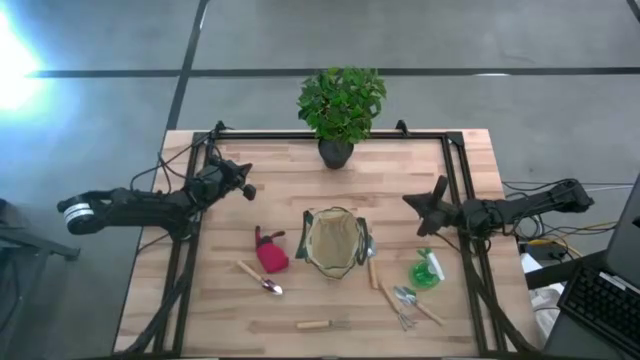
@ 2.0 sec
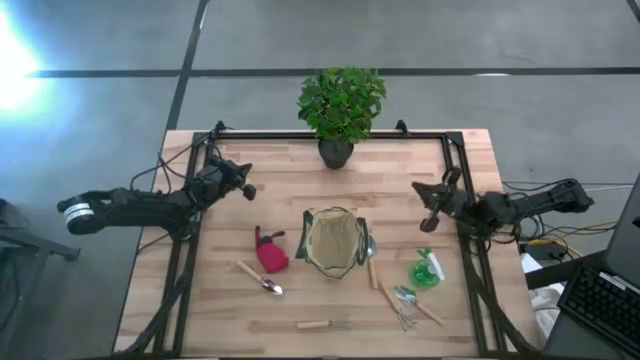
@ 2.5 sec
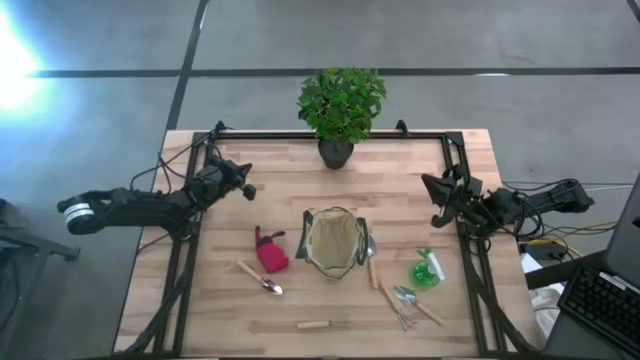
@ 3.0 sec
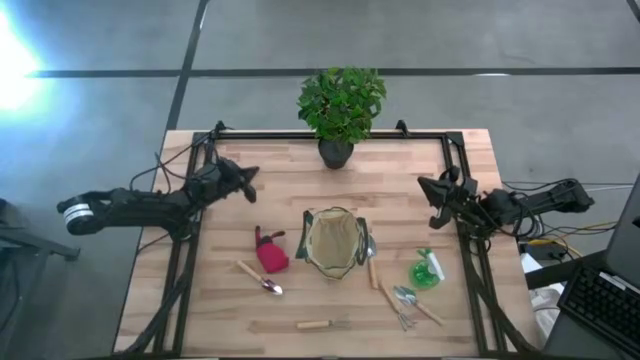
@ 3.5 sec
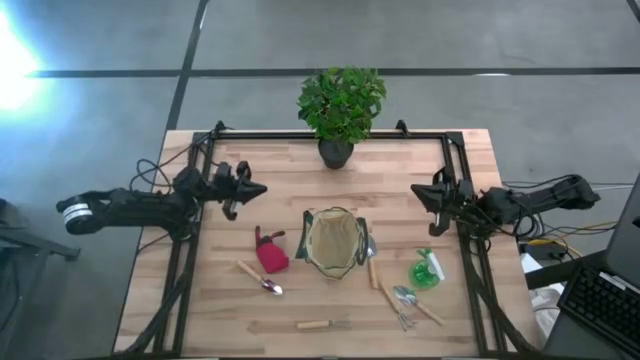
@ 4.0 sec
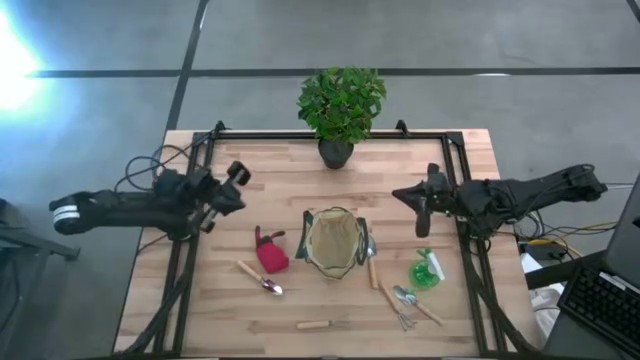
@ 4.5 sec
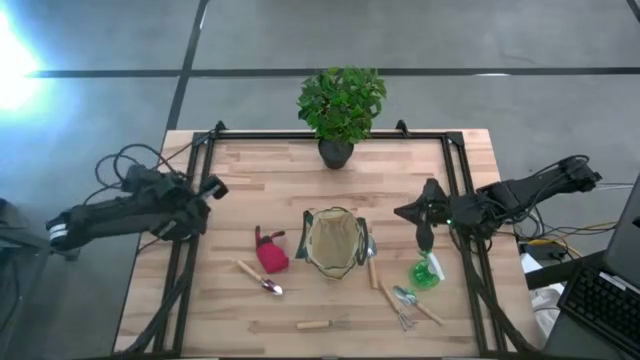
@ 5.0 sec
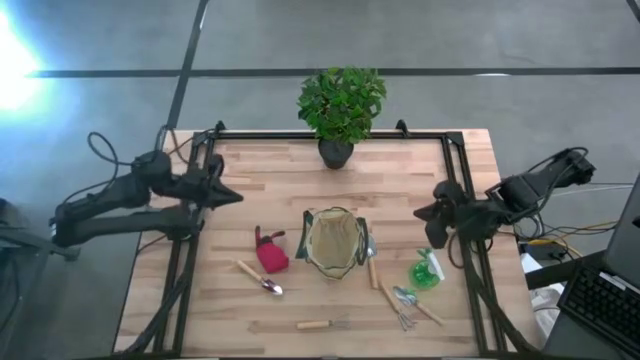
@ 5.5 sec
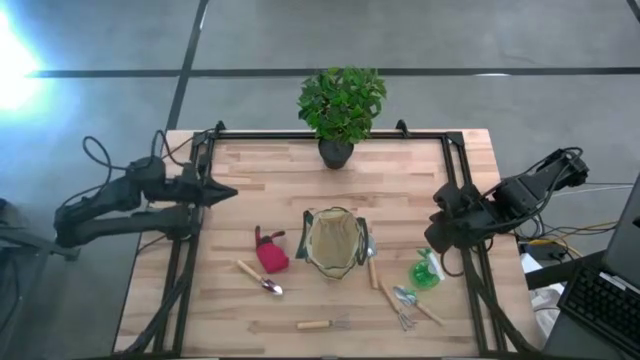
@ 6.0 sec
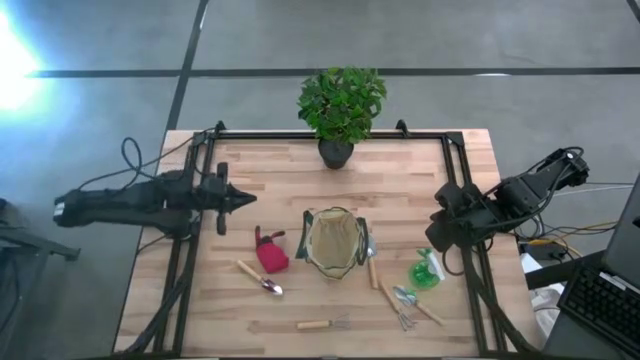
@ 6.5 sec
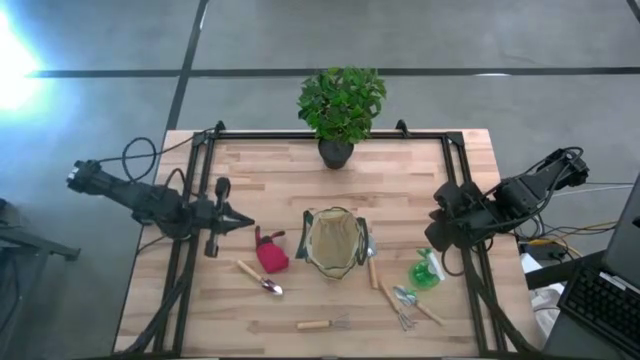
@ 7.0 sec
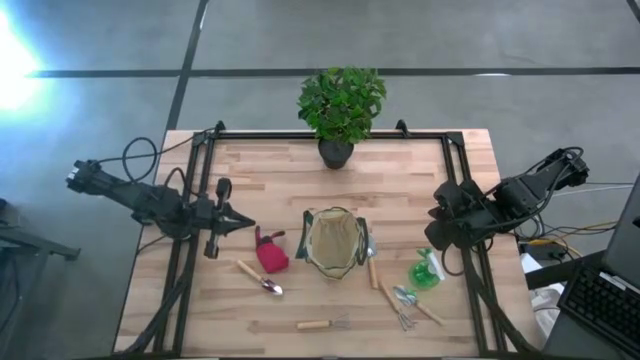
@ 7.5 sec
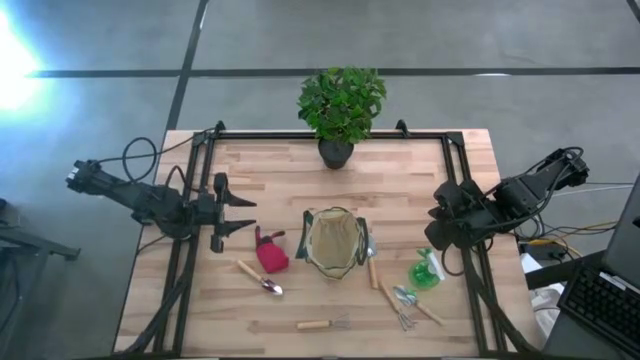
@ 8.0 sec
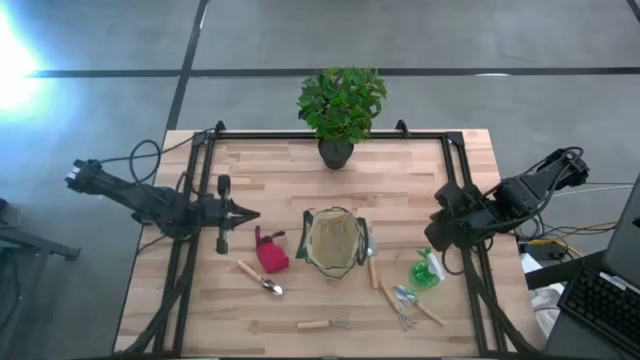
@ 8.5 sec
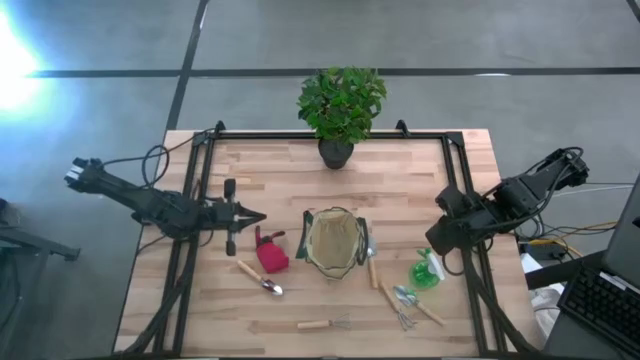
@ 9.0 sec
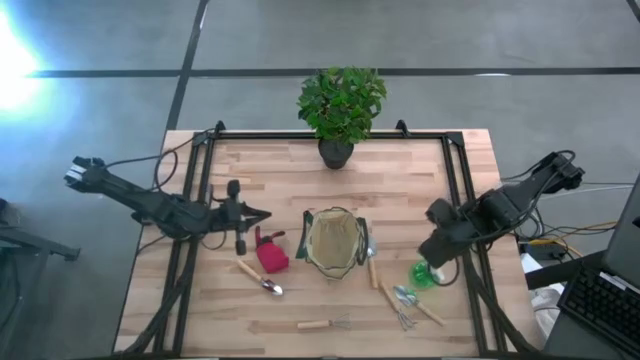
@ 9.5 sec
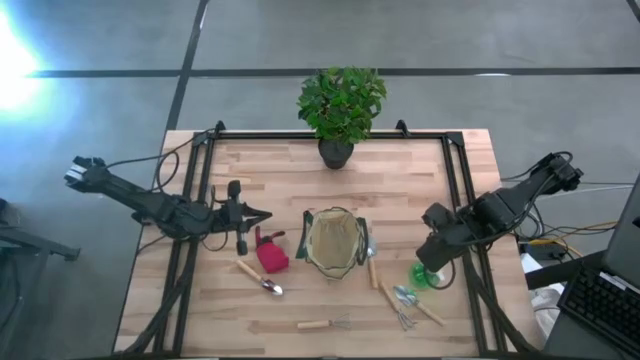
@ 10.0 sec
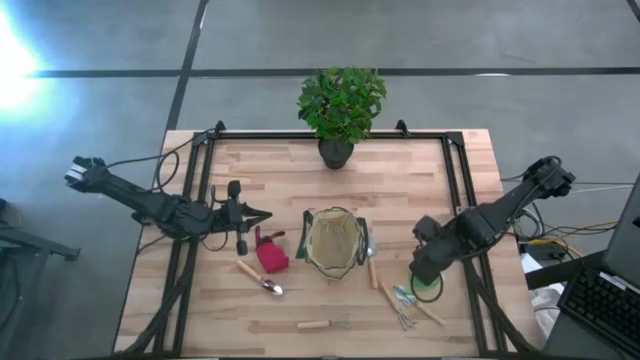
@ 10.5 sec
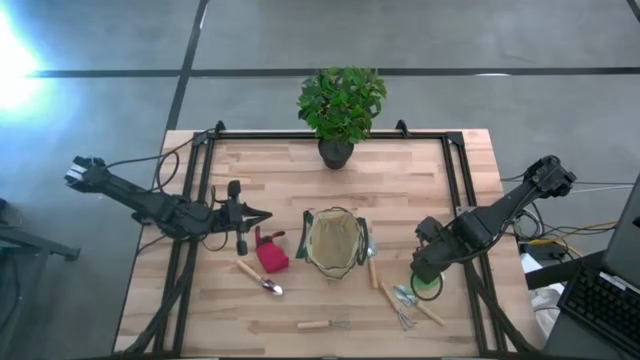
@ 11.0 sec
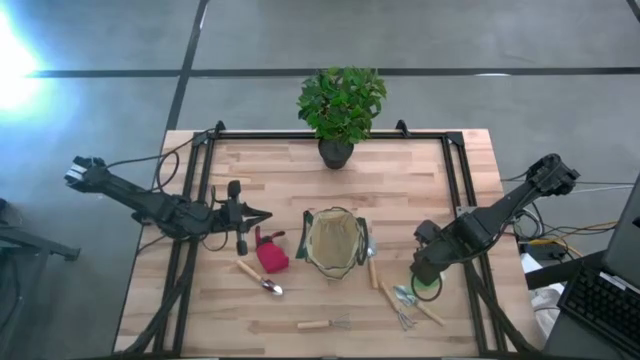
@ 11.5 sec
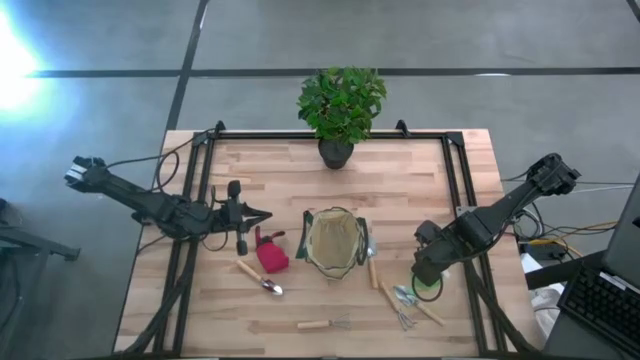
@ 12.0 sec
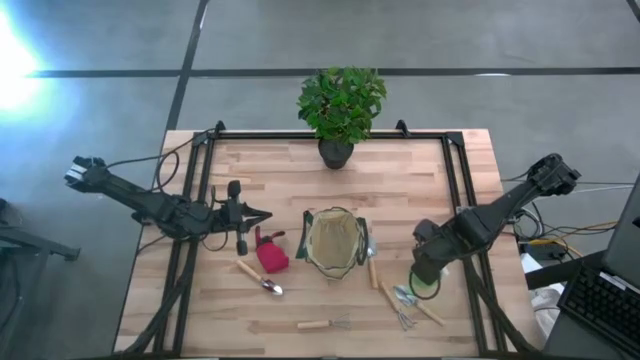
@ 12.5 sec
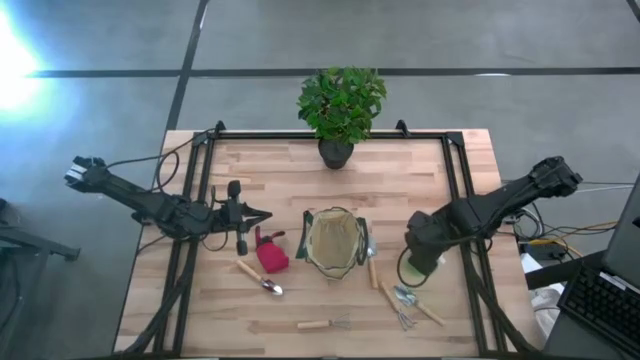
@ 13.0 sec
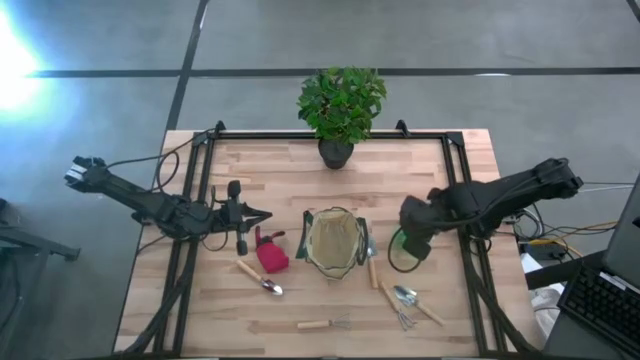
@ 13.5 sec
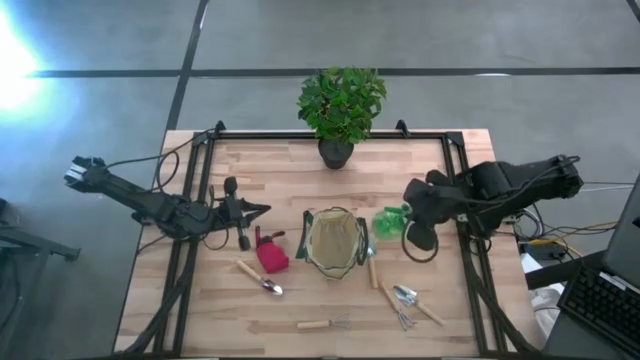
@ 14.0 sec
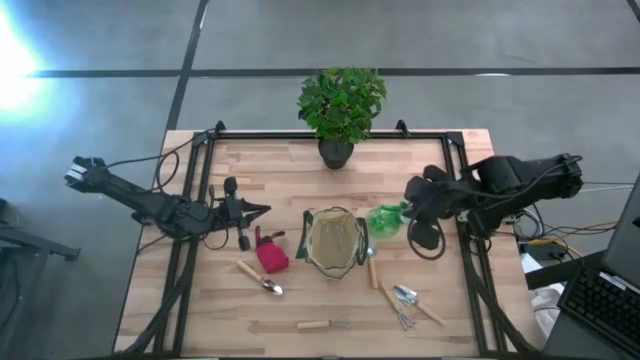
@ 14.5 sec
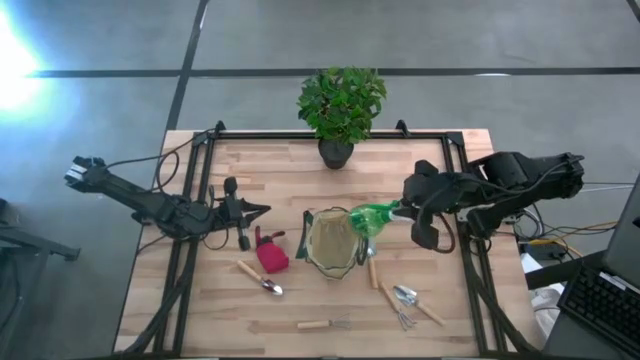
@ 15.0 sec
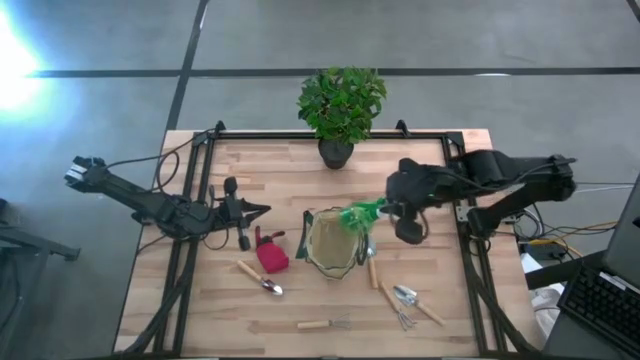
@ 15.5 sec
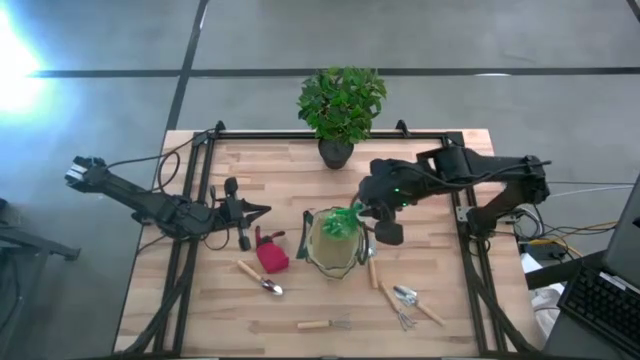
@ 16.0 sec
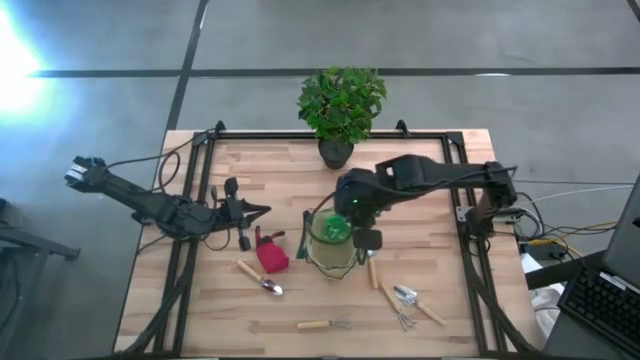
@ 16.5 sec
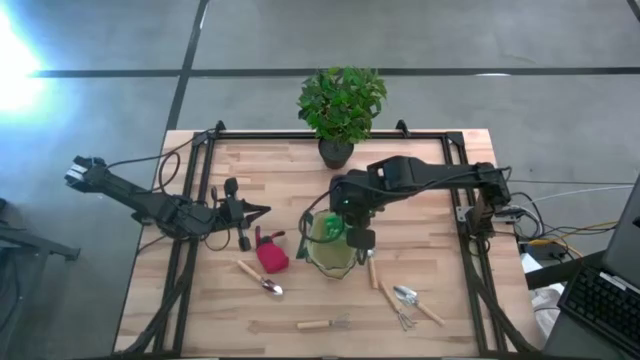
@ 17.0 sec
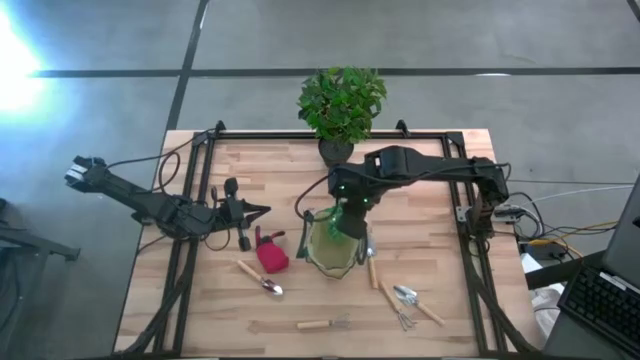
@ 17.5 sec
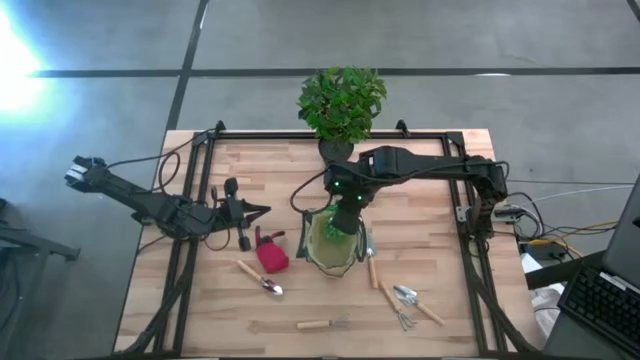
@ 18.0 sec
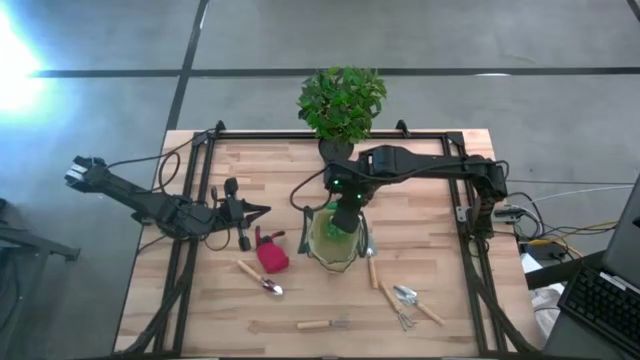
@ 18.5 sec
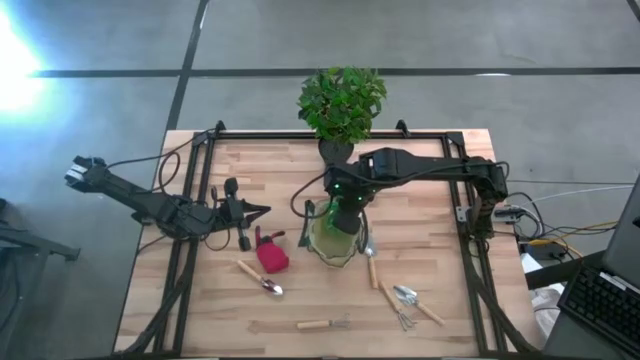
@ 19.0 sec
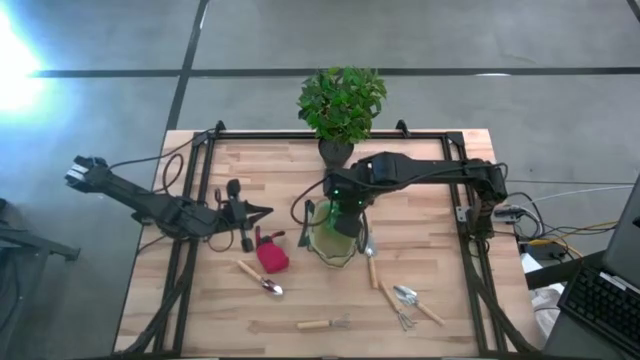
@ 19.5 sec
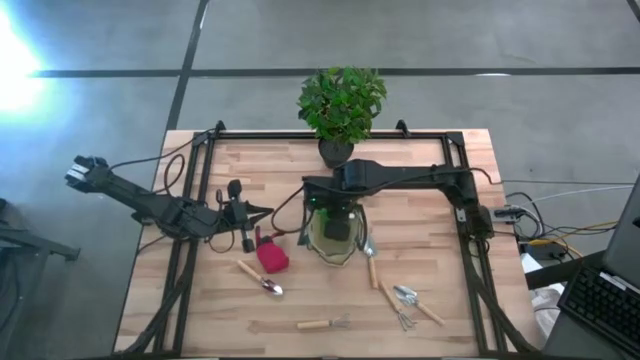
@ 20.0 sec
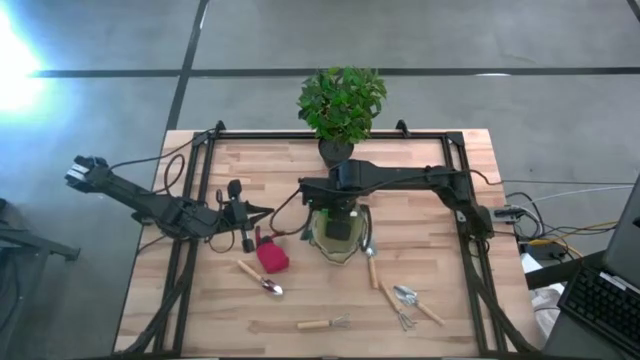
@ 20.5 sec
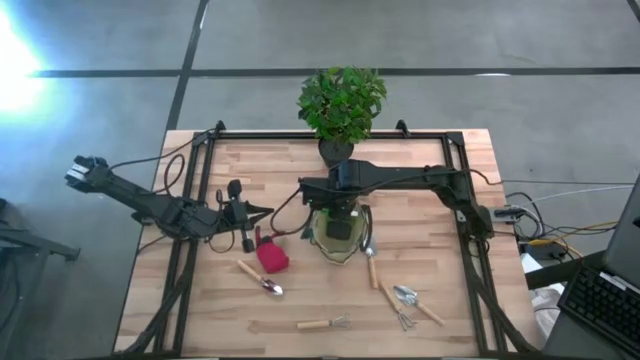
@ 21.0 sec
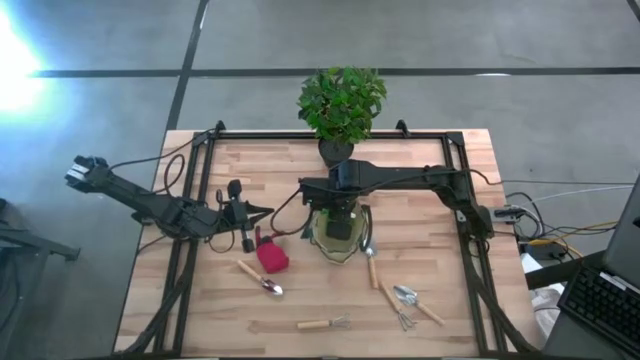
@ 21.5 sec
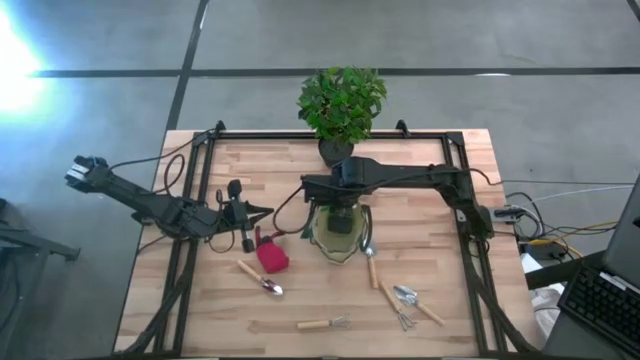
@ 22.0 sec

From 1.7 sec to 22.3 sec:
Task: Pick & Place Garden tools in Gardening bag
Put the green spray bottle into the gardening bag
